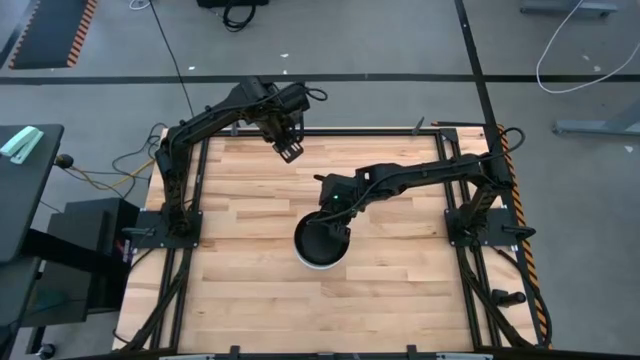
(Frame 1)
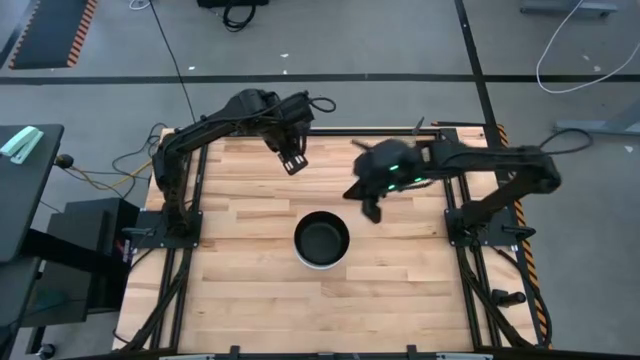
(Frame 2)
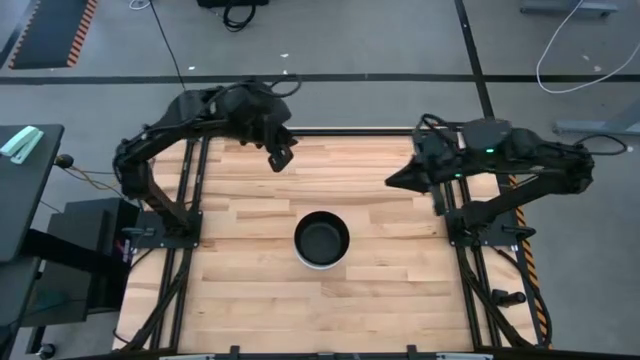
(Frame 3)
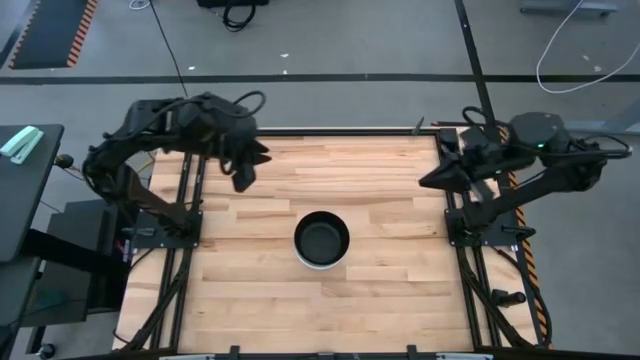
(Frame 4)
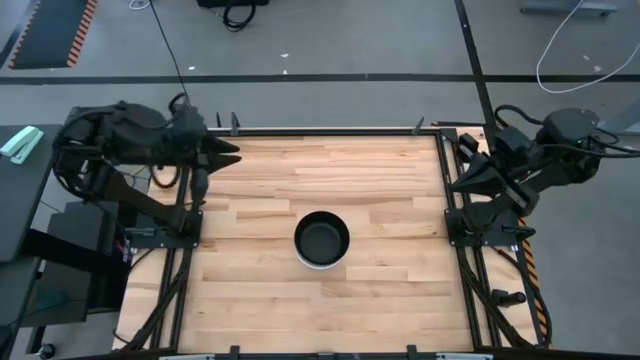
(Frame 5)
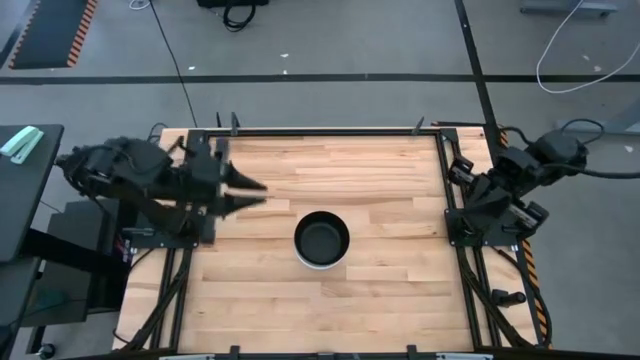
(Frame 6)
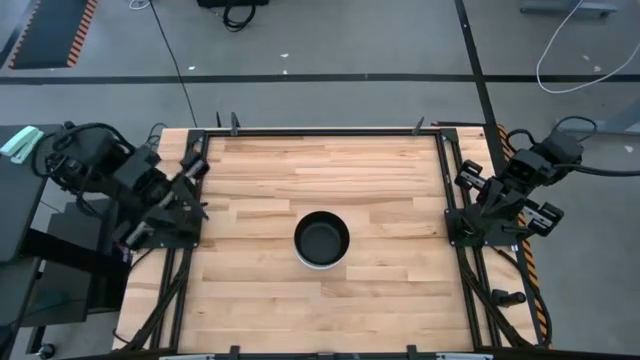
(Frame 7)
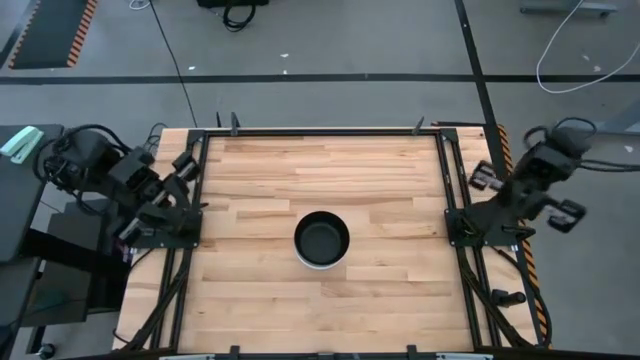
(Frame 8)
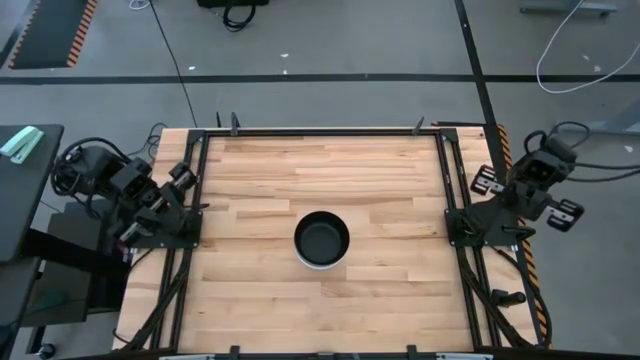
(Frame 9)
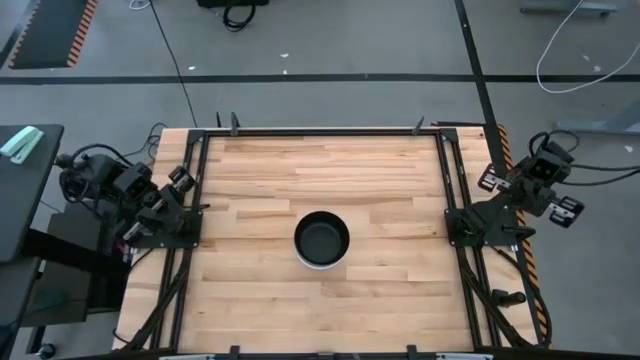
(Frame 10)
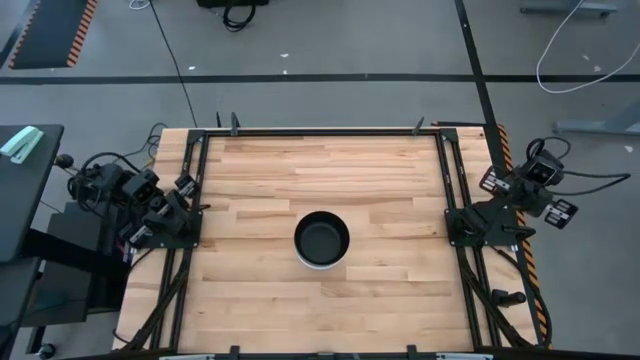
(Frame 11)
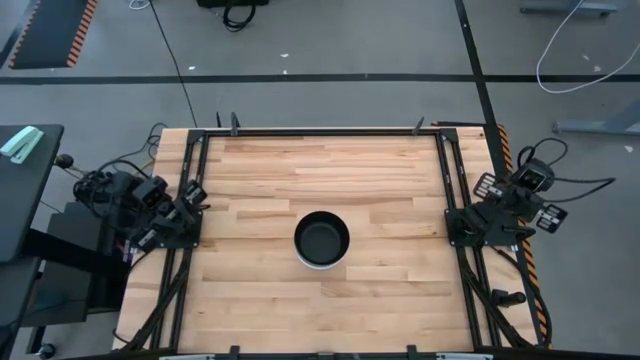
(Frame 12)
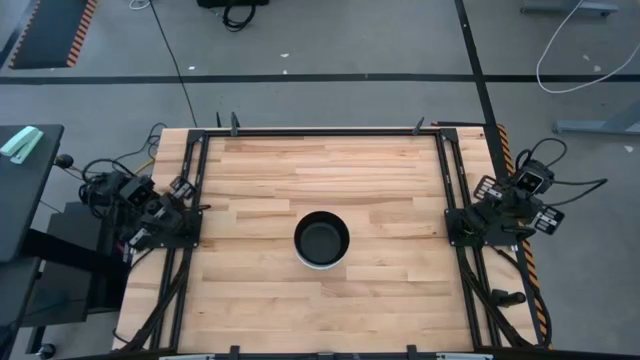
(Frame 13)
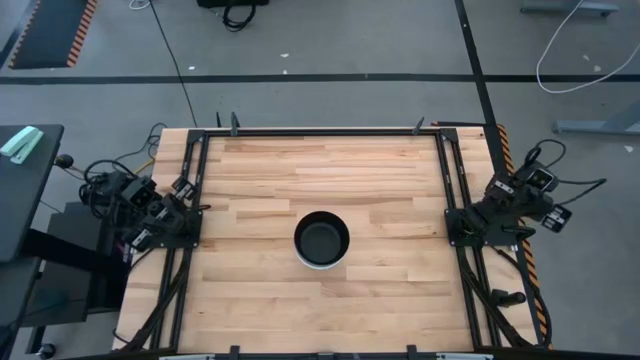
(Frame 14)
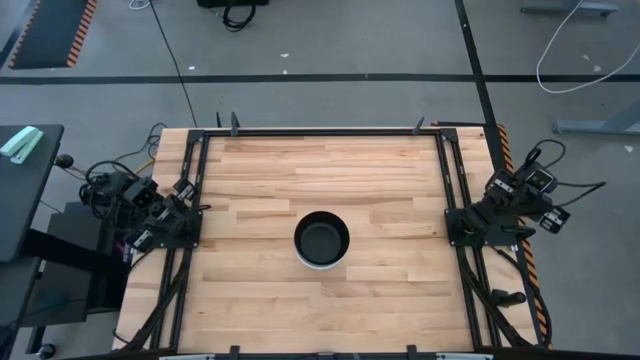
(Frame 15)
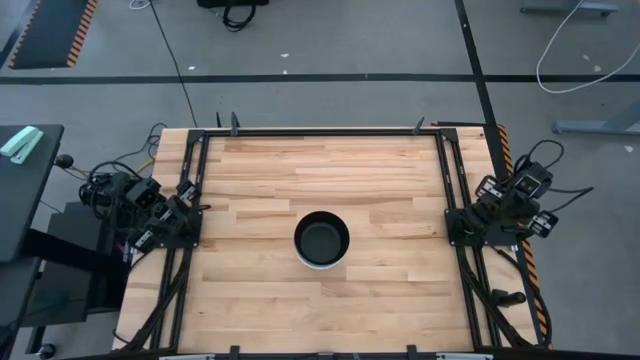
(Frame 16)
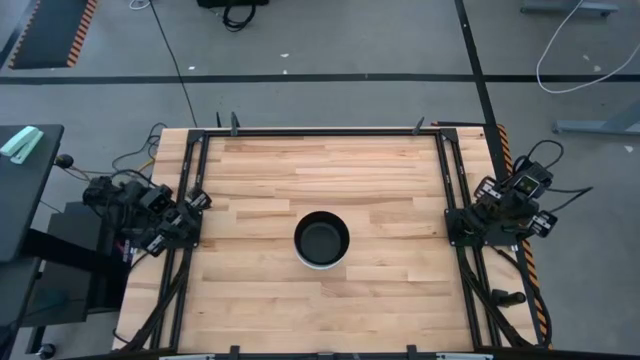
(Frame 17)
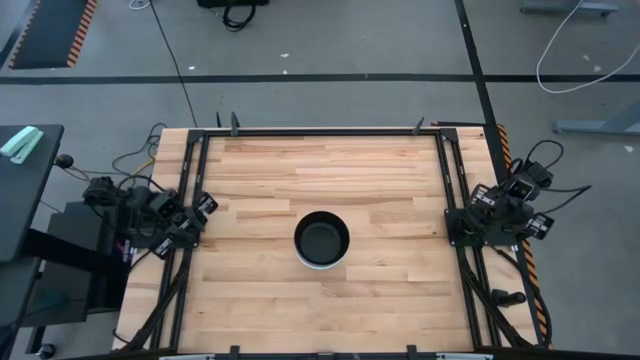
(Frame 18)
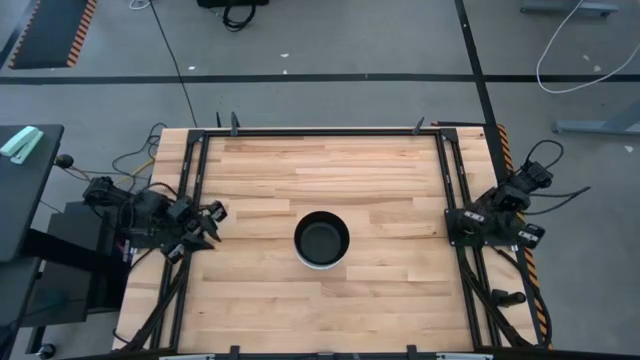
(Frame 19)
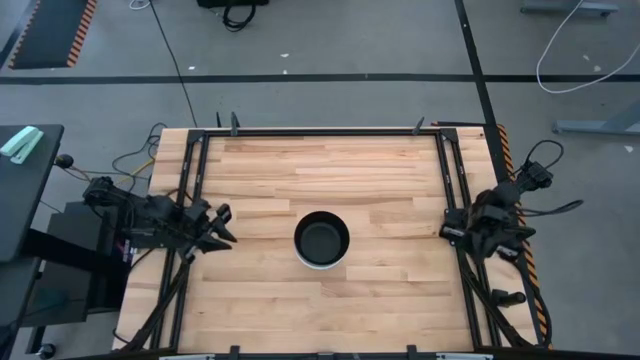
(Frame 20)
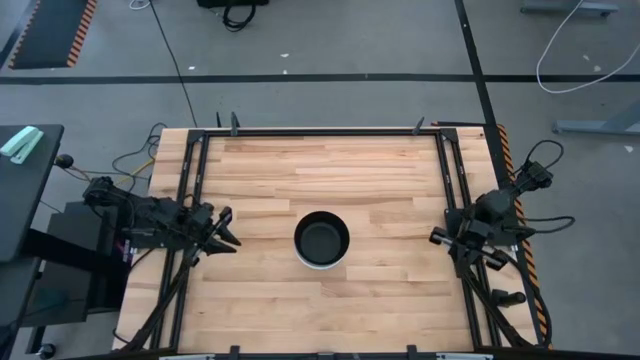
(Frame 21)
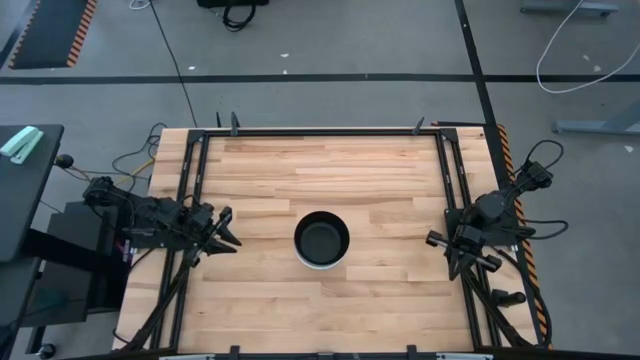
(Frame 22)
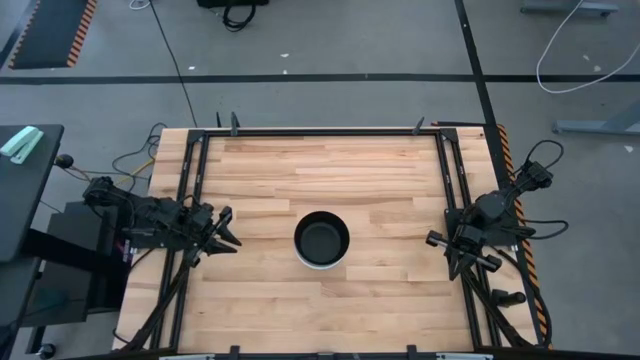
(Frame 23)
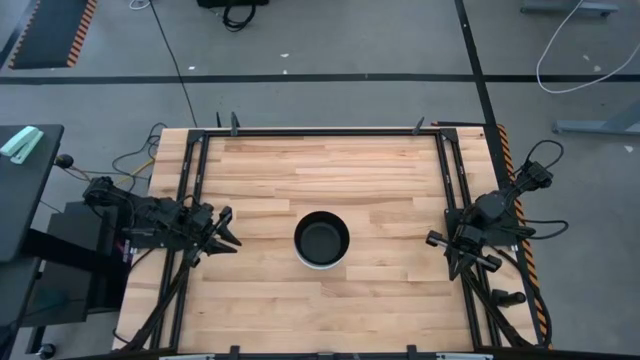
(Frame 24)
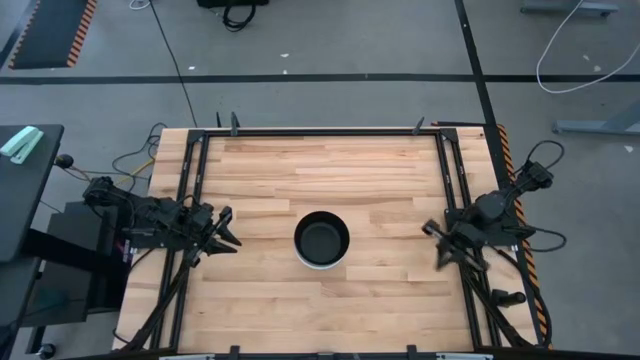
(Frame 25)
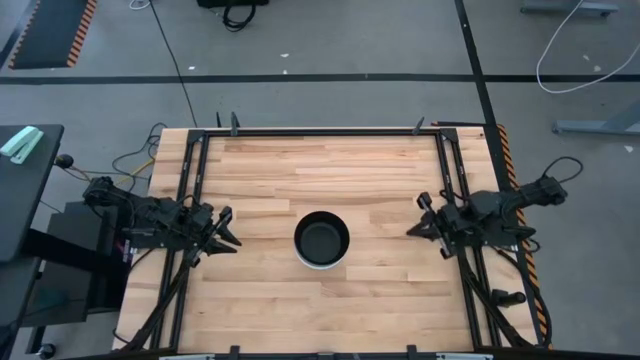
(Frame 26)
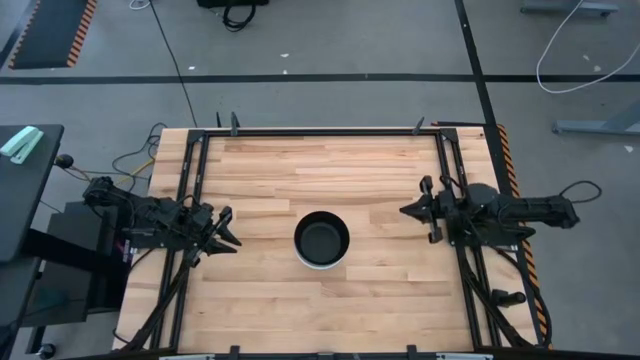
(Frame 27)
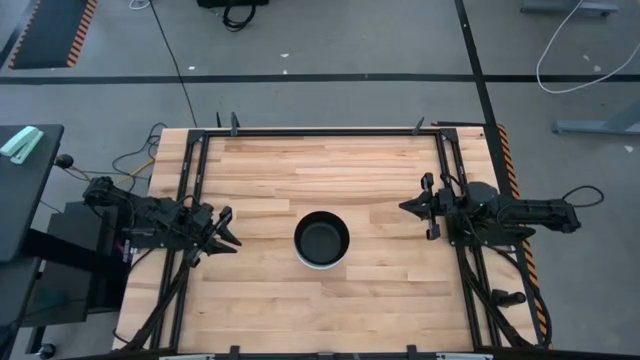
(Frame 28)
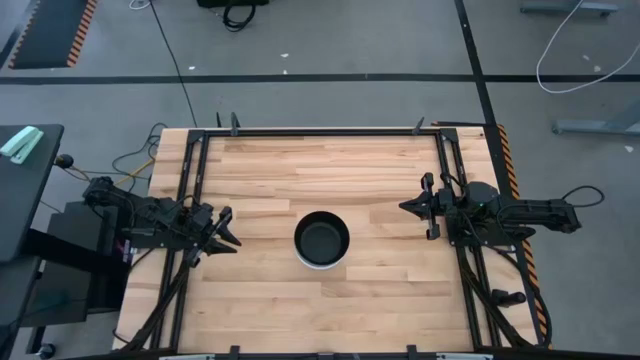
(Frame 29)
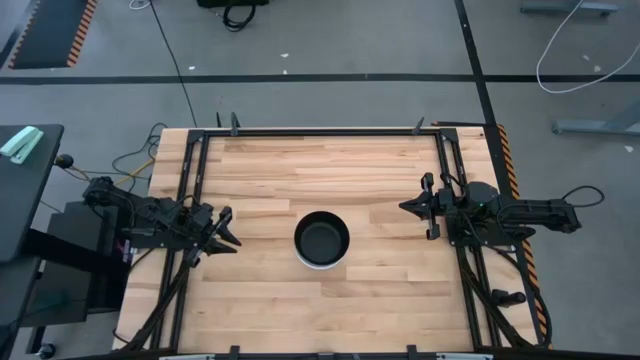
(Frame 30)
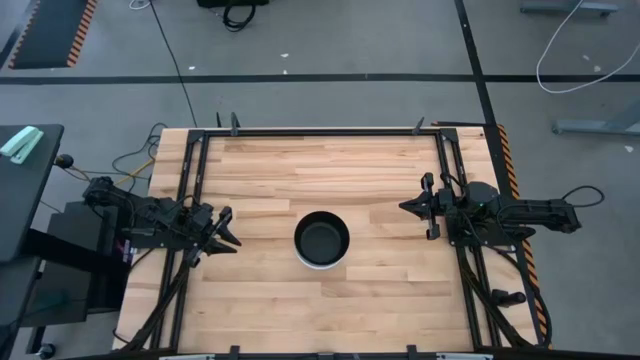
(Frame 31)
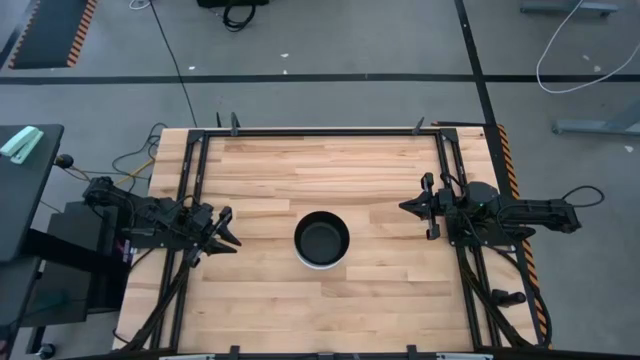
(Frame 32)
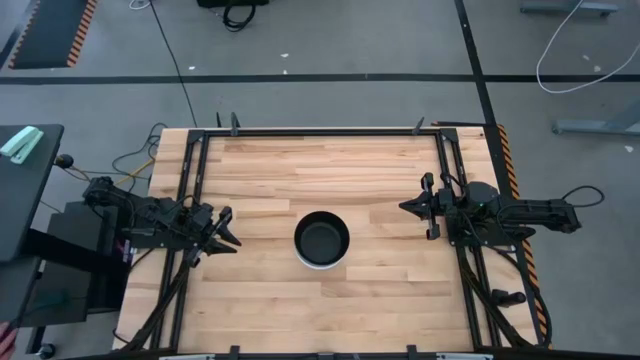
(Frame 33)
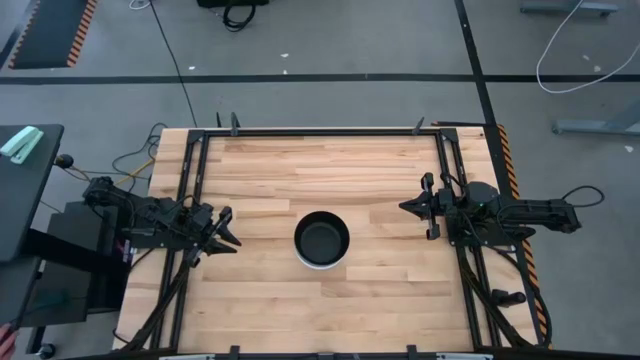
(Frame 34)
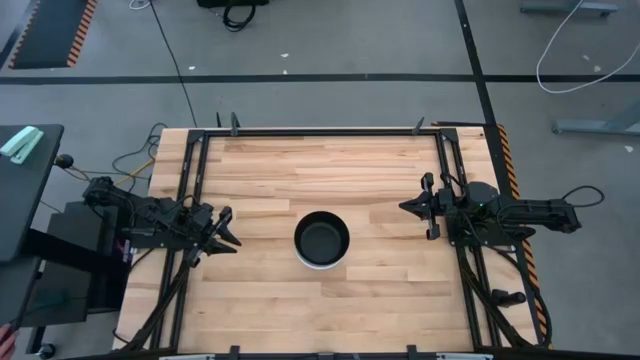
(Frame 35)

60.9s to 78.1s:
Task: Nest bowls inside each other
Return to Home Position

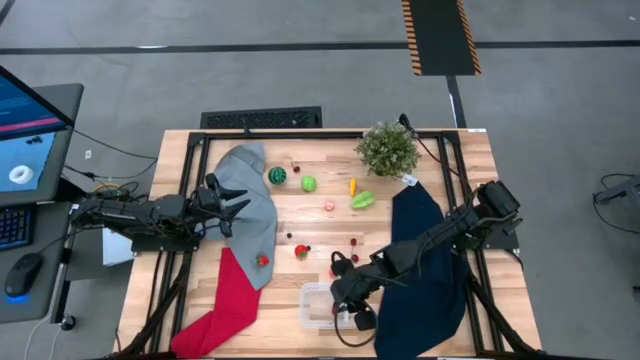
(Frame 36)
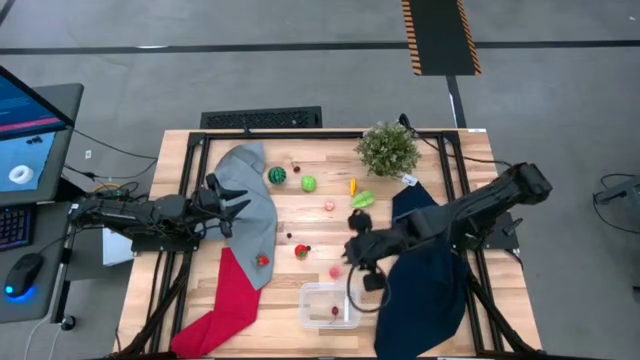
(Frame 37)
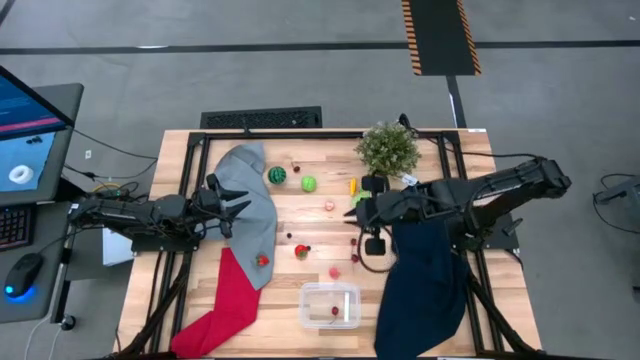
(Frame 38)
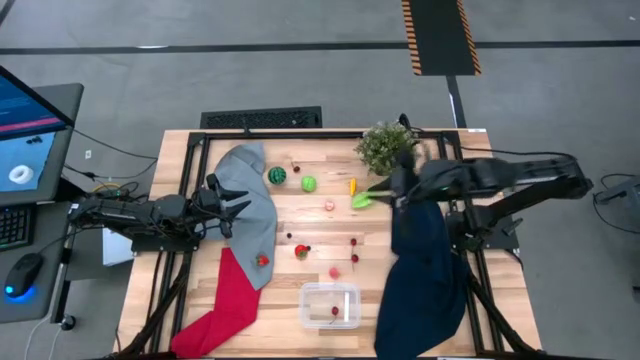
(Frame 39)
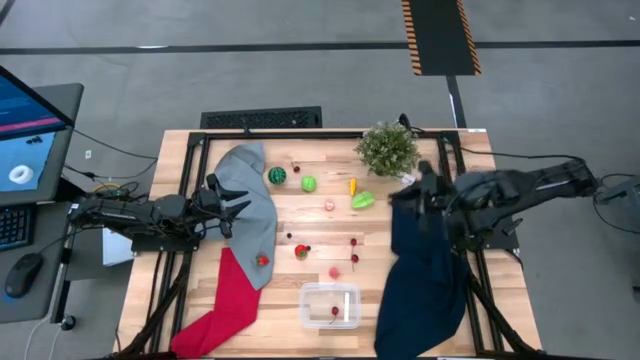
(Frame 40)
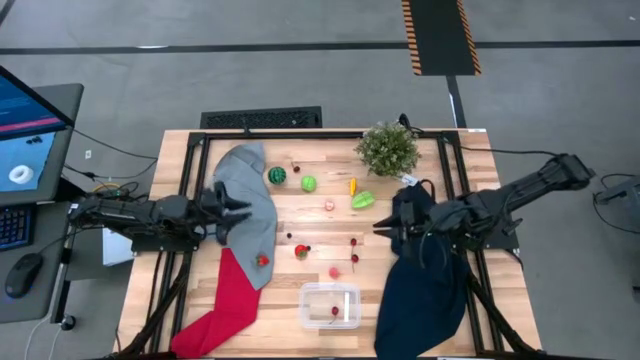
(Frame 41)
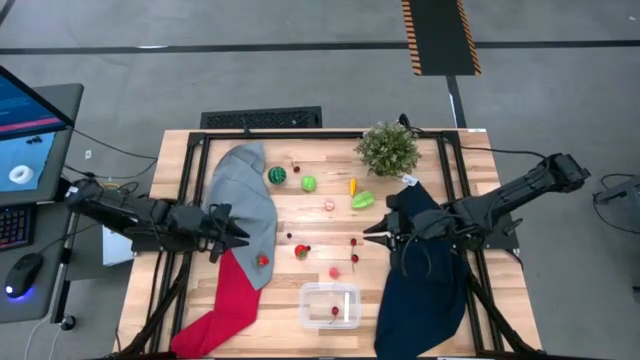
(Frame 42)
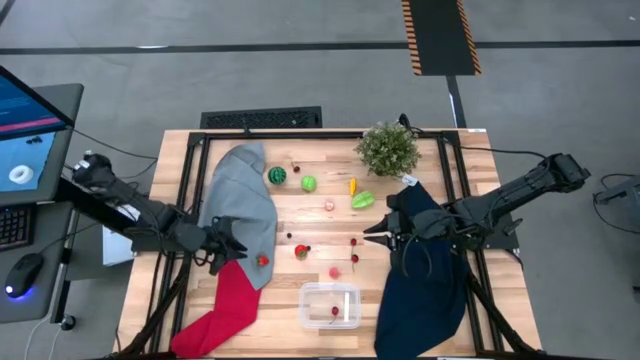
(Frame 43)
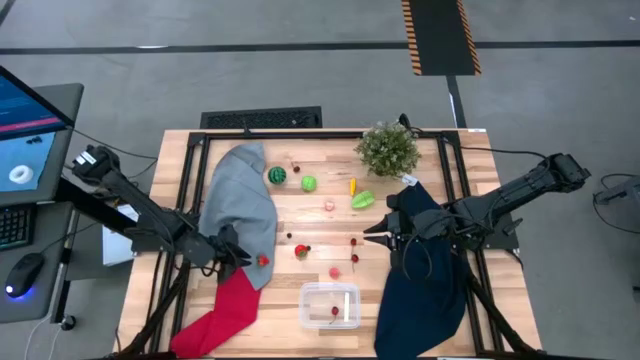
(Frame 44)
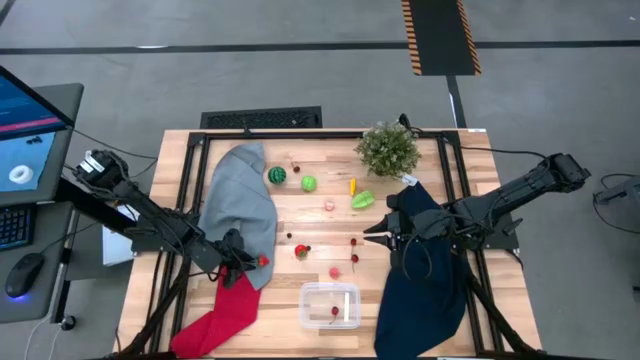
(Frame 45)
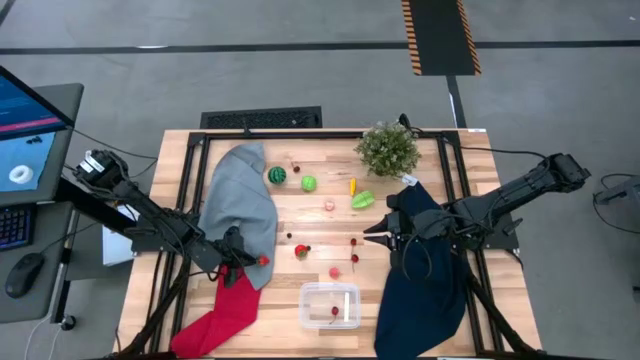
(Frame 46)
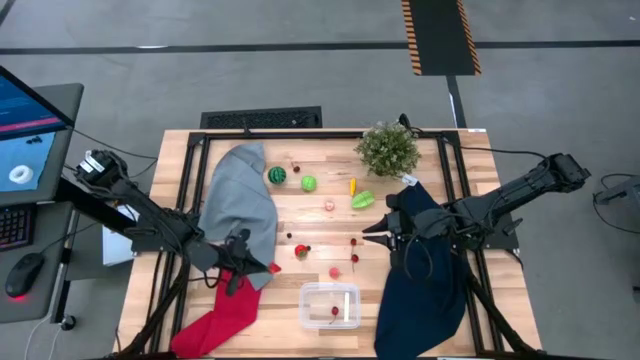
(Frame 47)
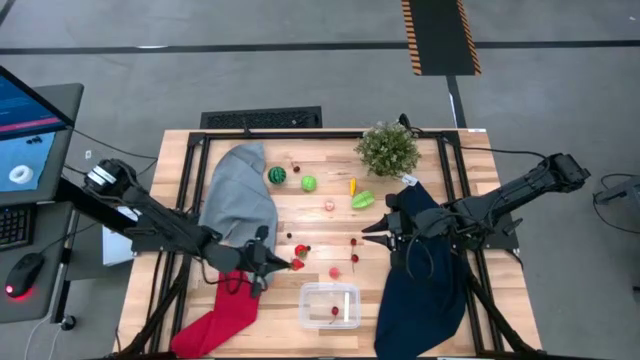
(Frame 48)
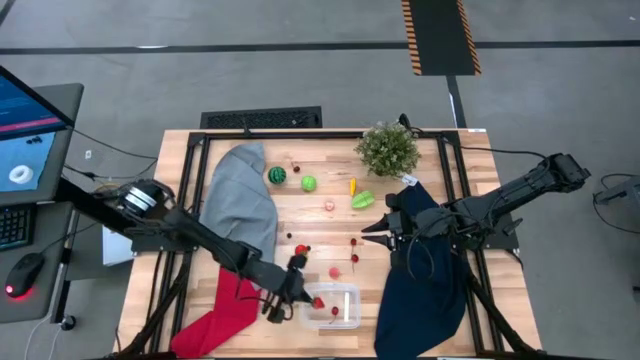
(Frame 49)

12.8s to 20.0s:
Task: Pick and placing Produce into tupperware
Put the strawberry into the transparent bin
